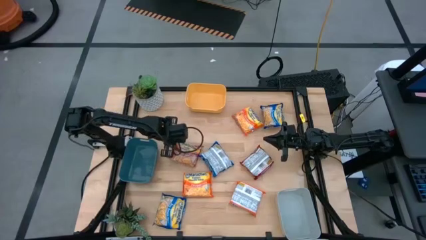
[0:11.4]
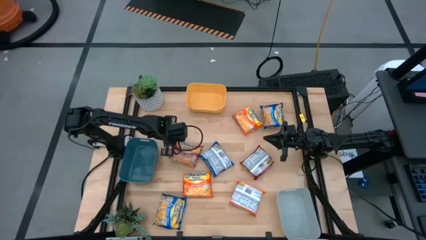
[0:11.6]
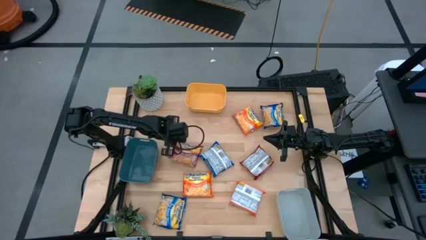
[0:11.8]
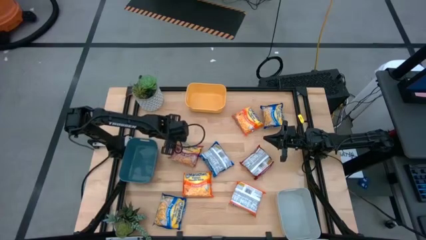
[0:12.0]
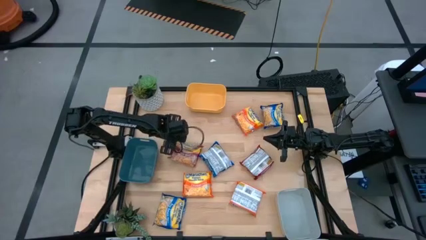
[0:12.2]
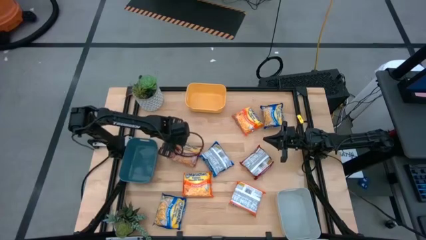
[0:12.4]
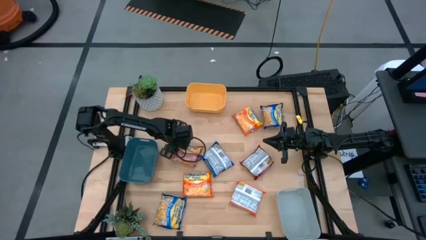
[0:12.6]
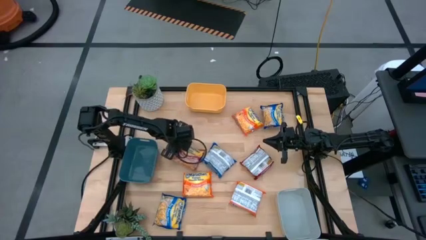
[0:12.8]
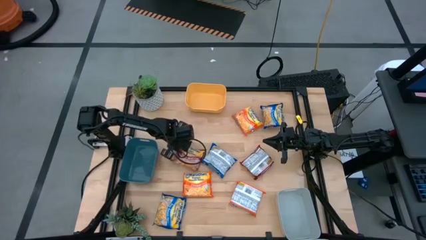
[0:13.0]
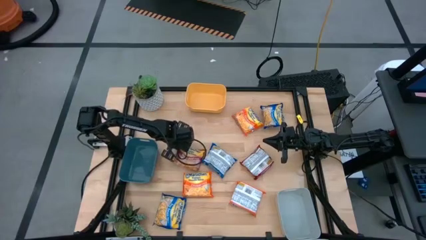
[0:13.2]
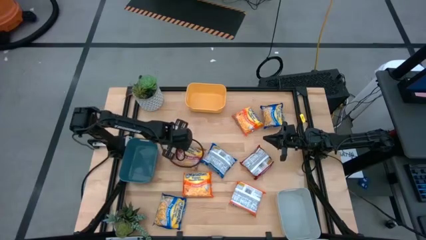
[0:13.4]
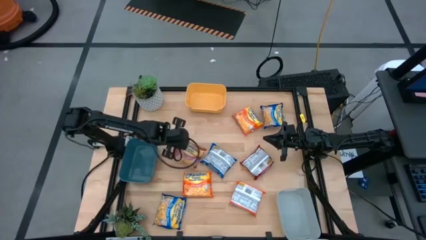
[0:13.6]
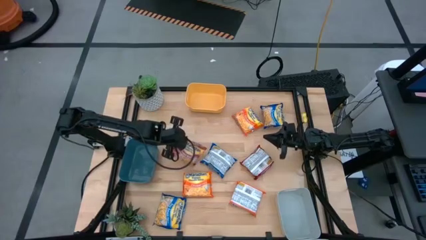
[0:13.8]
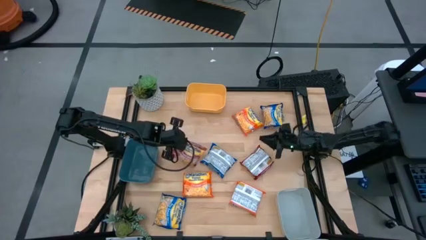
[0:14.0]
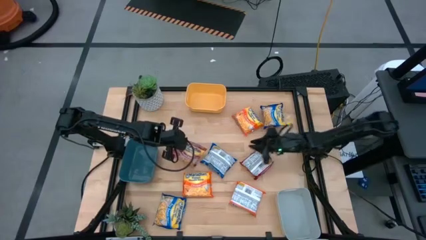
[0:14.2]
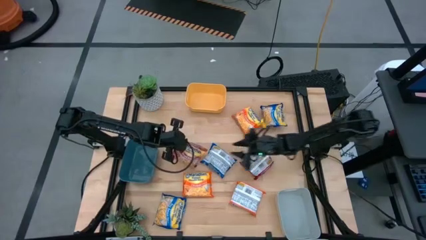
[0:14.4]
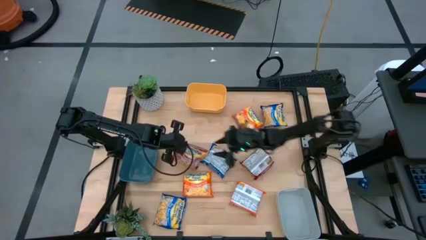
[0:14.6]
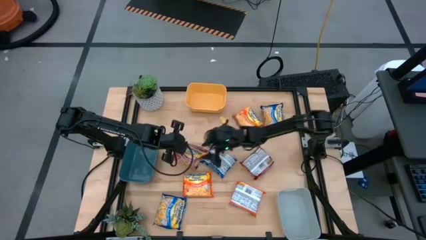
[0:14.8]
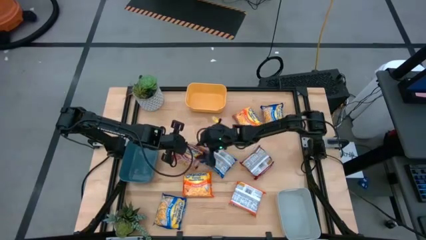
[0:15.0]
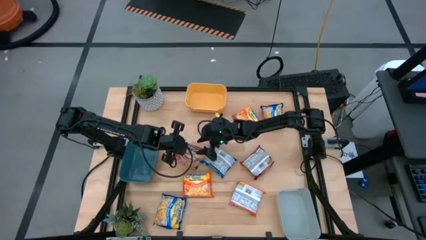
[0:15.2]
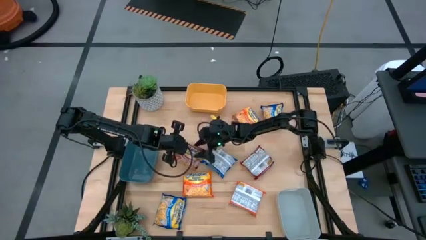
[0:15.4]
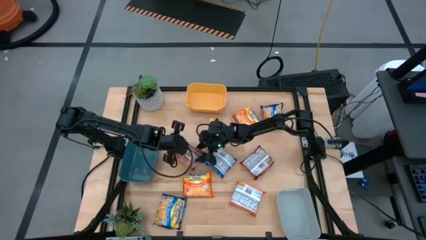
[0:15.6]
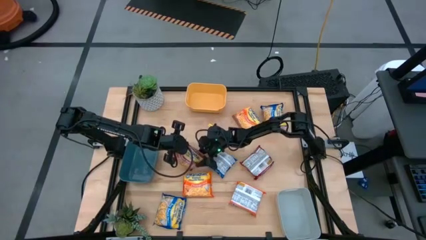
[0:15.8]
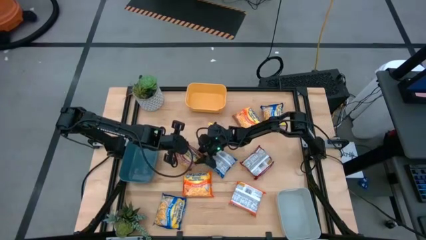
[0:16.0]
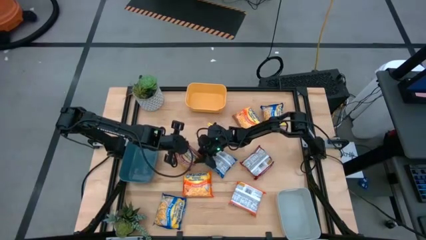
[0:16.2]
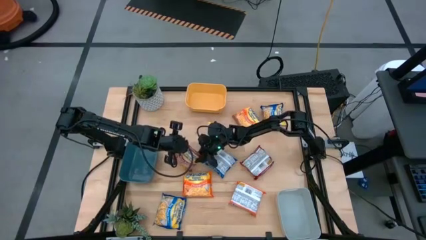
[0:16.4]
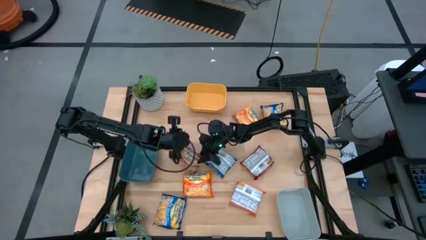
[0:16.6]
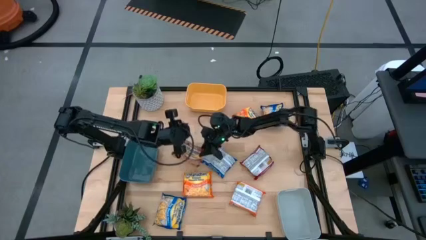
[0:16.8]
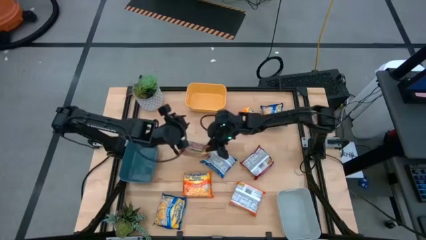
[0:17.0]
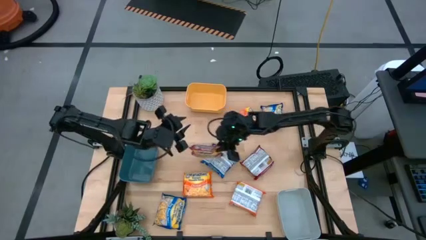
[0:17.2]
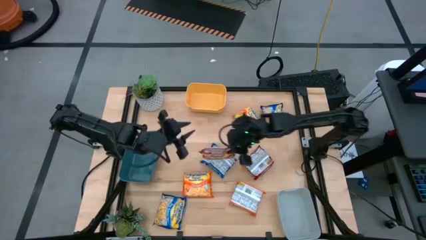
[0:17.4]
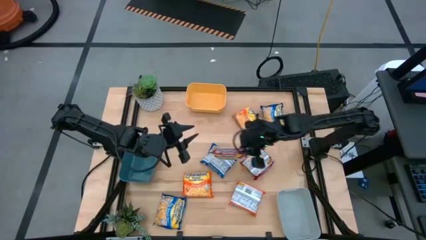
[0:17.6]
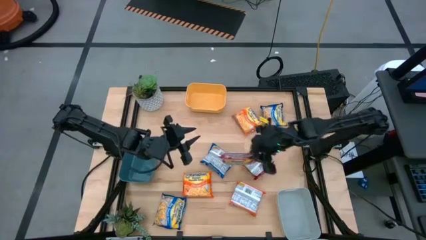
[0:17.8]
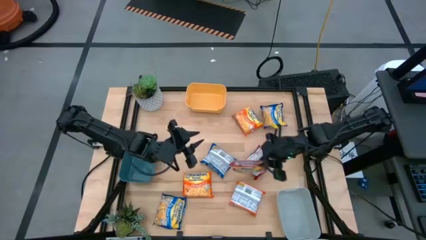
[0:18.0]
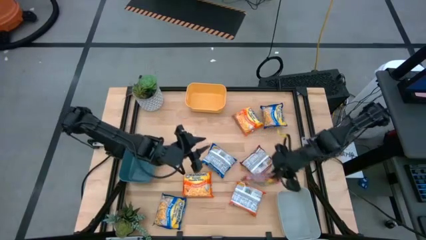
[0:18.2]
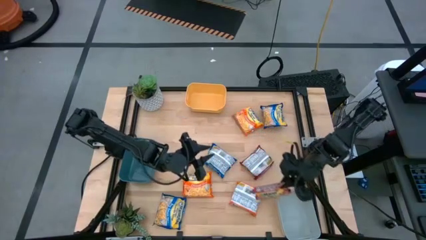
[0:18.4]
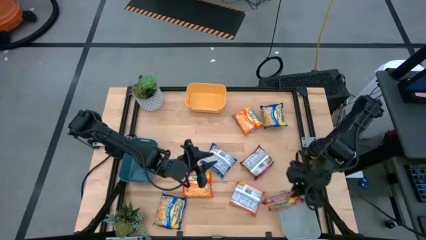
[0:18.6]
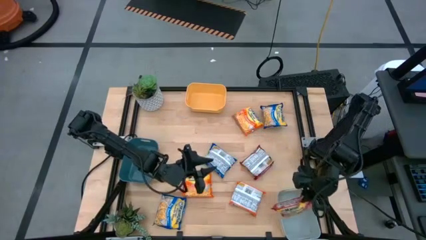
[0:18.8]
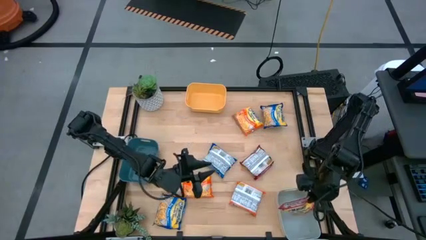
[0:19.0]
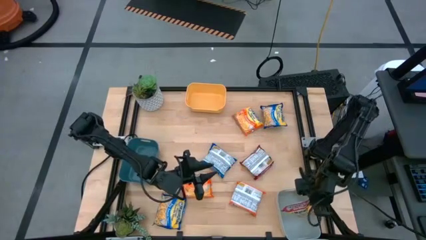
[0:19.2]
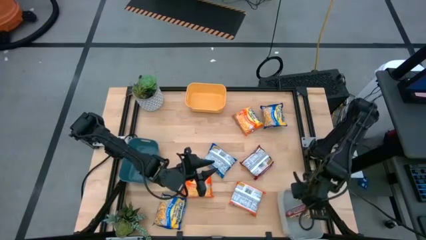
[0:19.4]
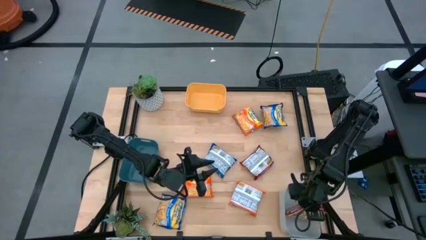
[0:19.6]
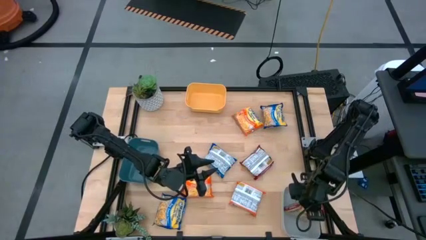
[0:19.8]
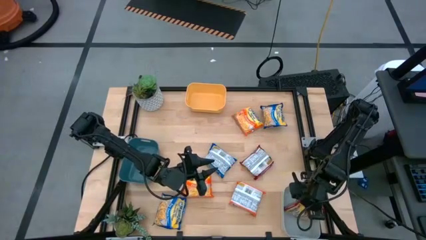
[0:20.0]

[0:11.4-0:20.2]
Task: Sort Maruchan noodles
Put the left red noodle pack into the gray bin

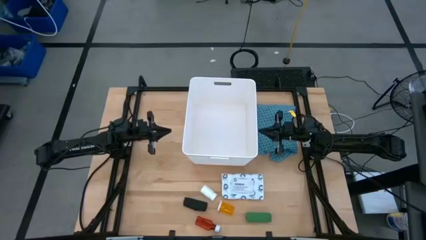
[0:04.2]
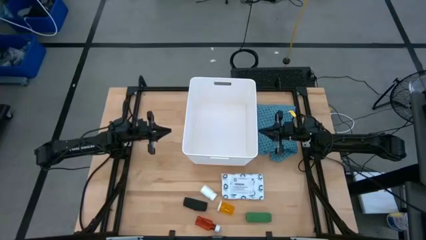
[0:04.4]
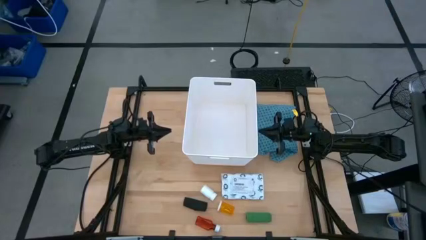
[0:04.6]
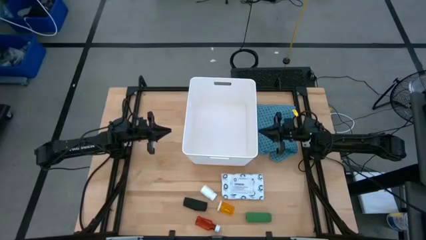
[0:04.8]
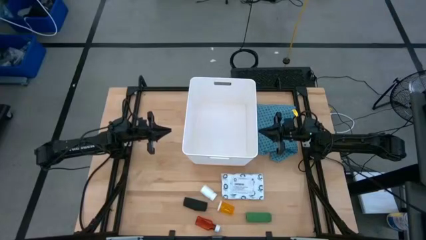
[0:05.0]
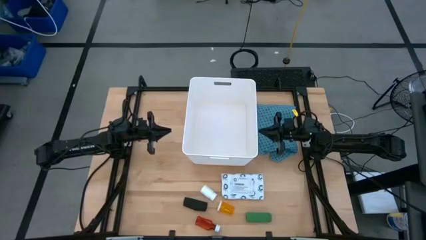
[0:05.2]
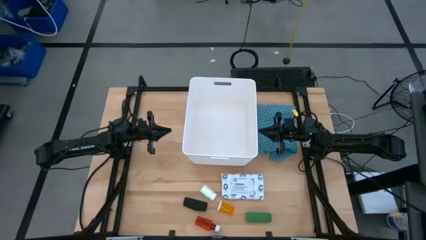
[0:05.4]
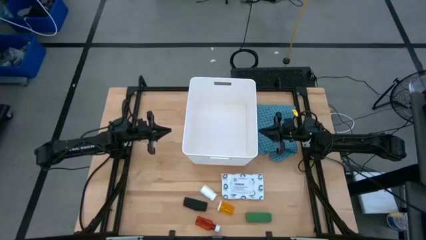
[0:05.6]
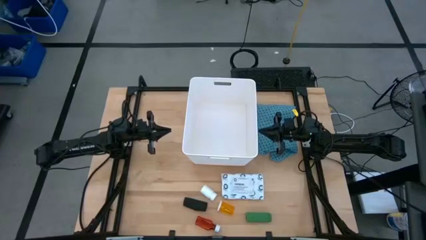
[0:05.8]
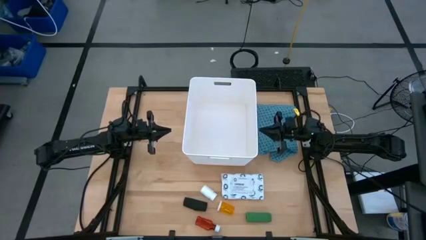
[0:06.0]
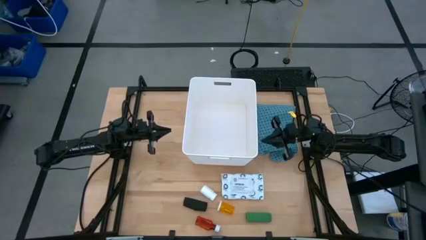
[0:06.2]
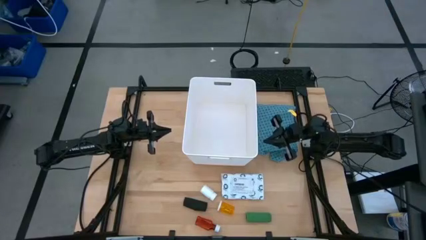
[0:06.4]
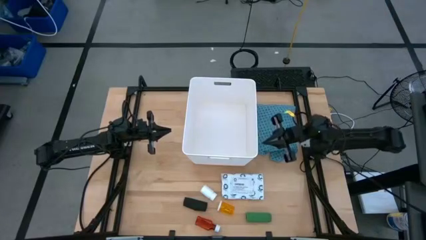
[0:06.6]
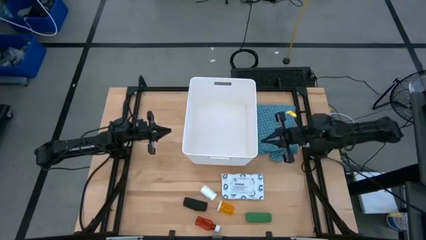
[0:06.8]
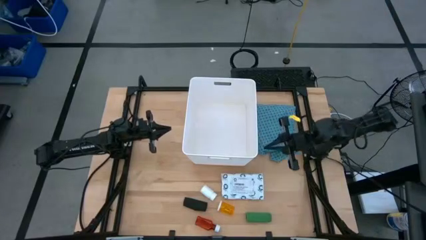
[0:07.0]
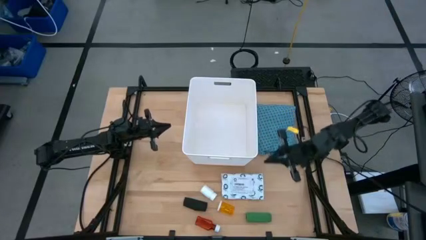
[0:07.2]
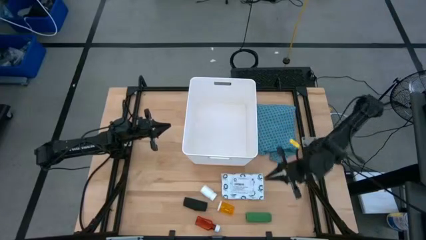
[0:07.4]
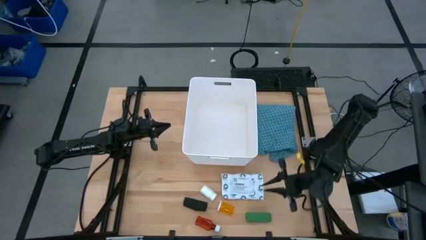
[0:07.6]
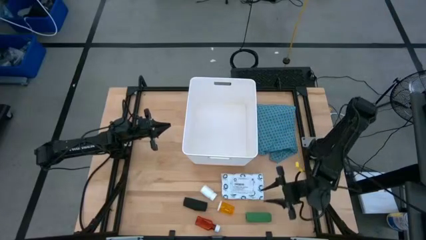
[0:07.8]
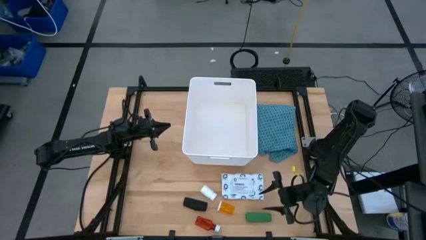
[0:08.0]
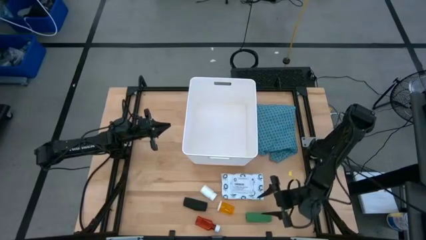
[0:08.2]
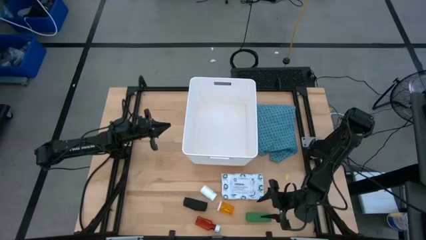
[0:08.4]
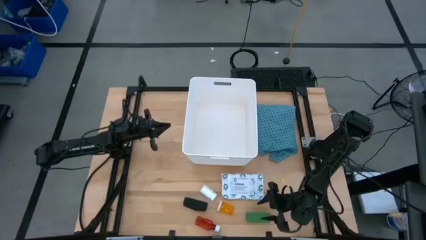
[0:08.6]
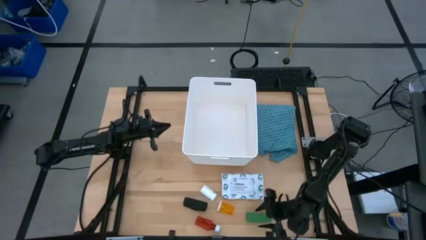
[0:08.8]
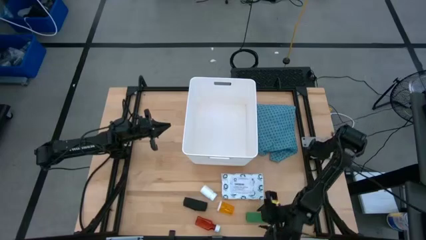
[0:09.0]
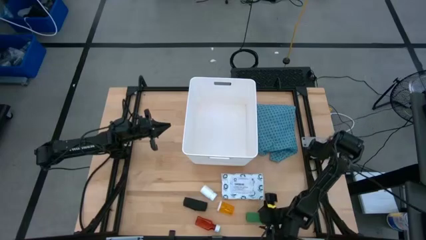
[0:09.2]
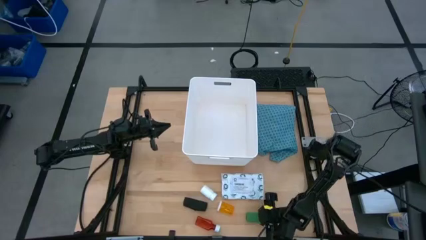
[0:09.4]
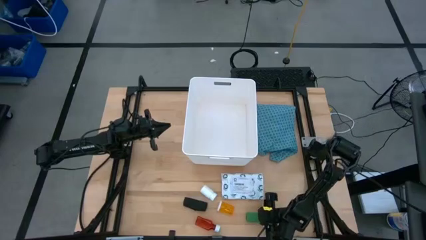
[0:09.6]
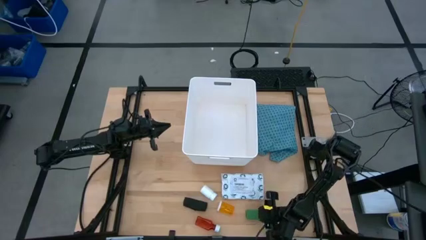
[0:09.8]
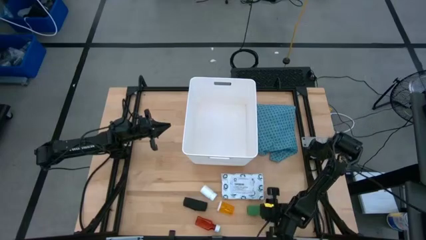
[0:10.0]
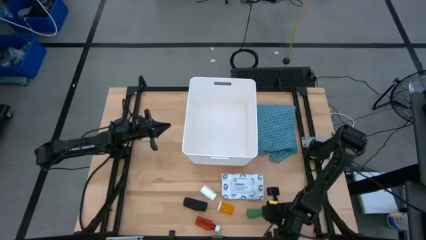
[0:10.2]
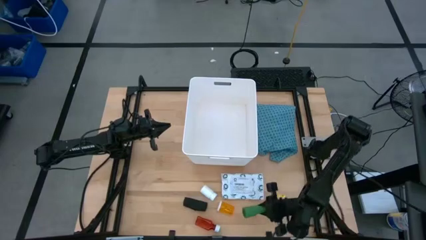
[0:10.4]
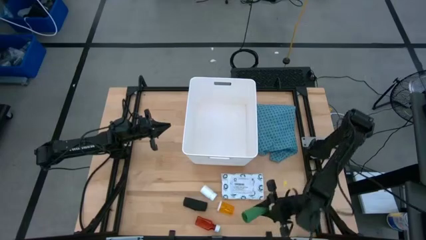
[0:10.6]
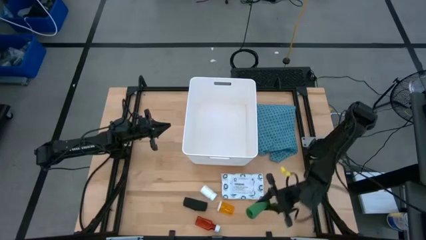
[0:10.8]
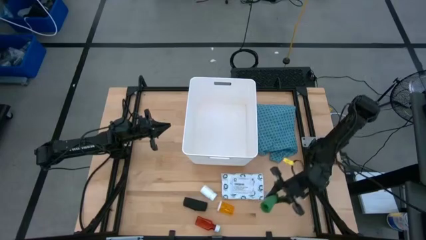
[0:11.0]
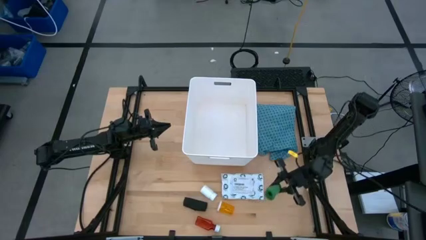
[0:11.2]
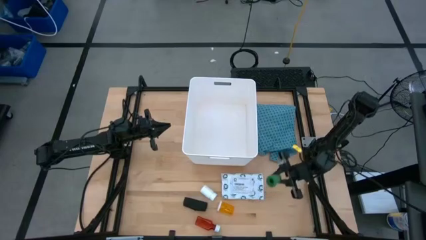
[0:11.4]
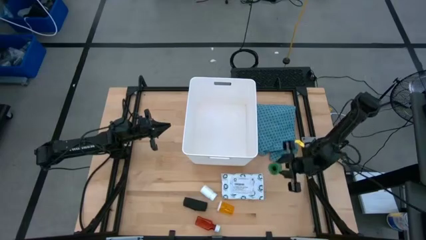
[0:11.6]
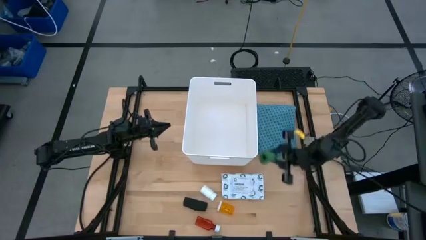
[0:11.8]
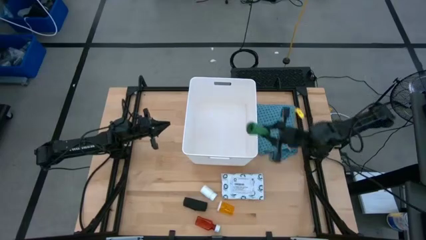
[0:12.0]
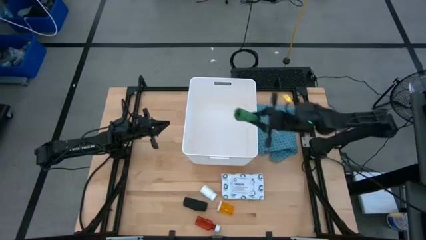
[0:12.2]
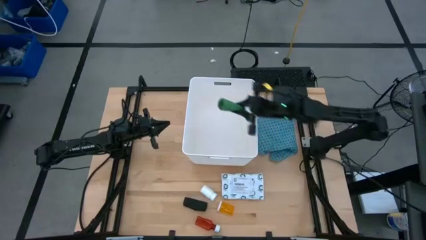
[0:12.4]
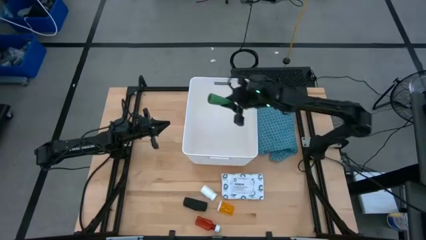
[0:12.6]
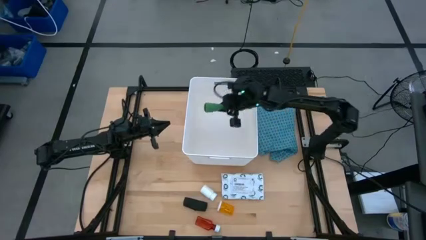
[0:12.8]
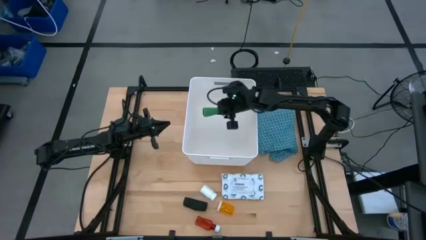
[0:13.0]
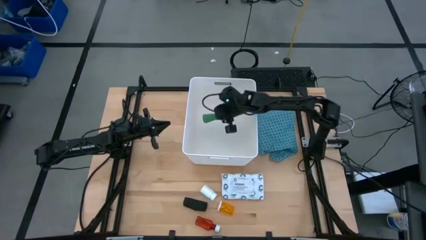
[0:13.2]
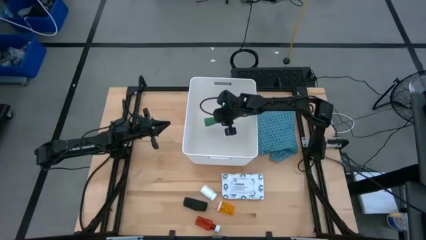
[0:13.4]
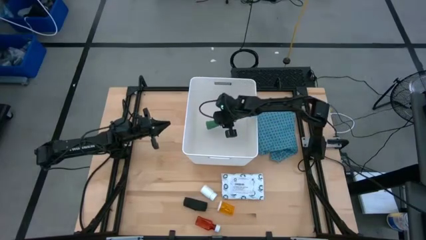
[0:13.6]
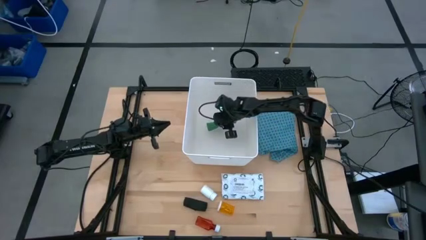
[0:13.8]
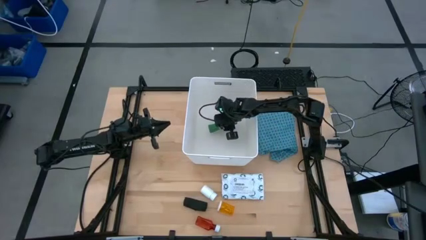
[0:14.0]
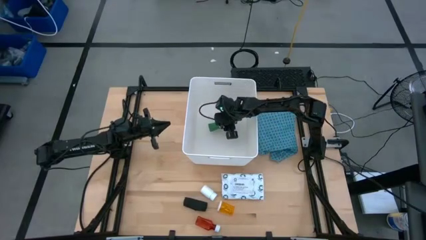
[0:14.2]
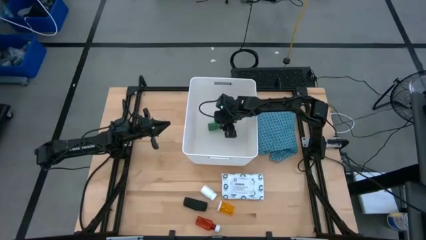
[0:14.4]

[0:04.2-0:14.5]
Task: Pick & place medical supplies in basket/bin
Put the green bandage into the white bin
